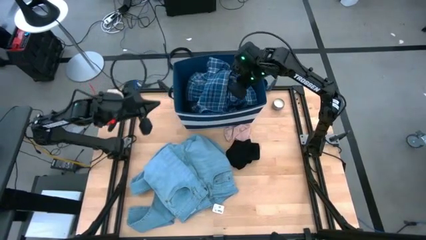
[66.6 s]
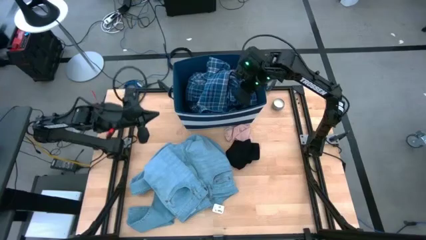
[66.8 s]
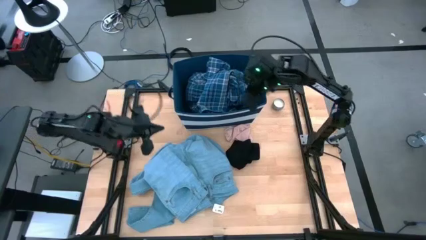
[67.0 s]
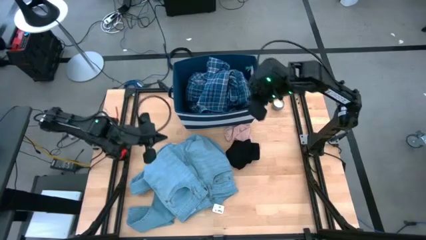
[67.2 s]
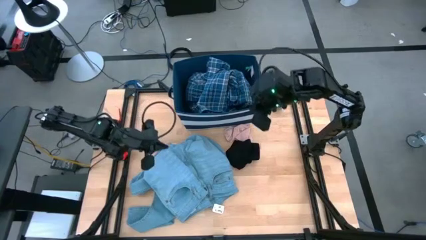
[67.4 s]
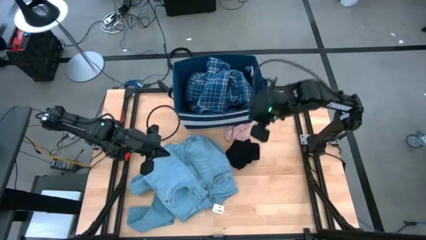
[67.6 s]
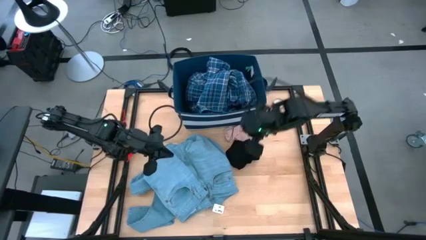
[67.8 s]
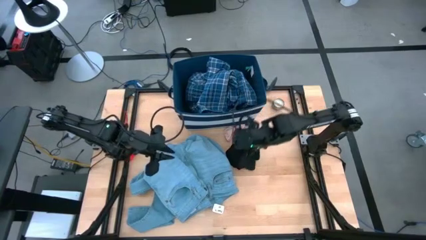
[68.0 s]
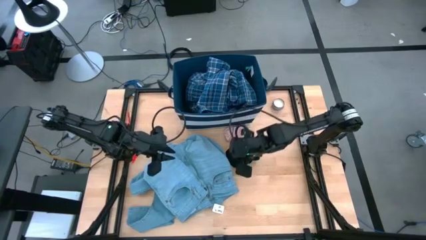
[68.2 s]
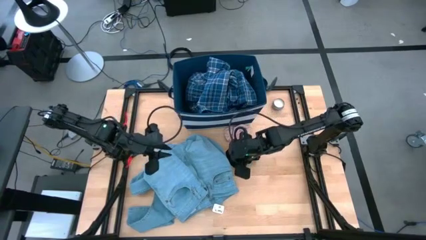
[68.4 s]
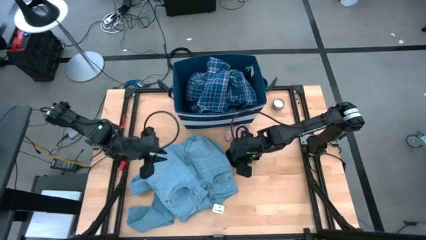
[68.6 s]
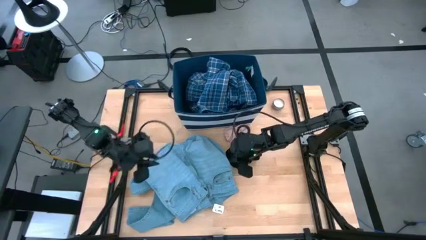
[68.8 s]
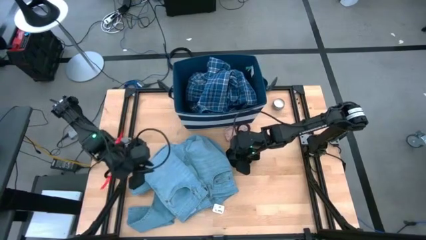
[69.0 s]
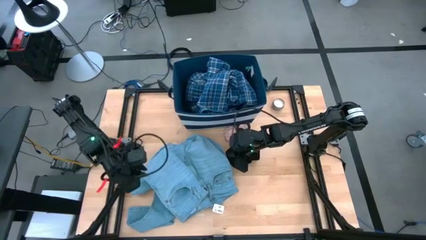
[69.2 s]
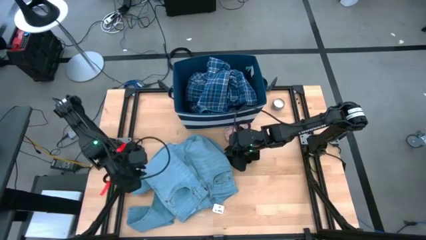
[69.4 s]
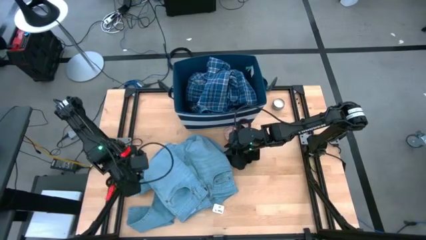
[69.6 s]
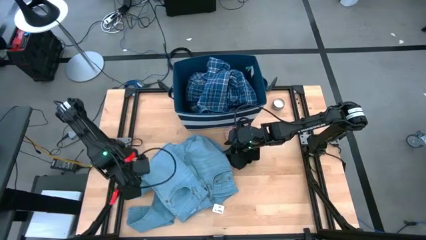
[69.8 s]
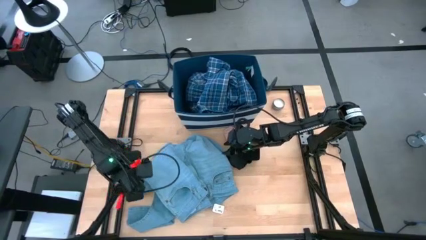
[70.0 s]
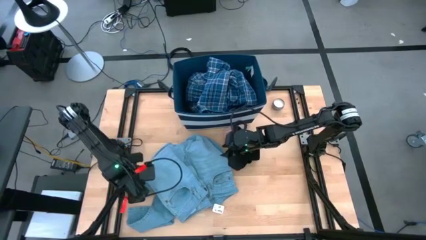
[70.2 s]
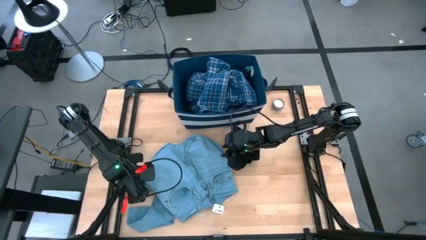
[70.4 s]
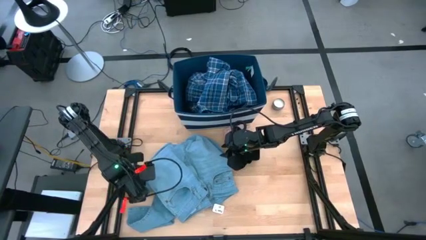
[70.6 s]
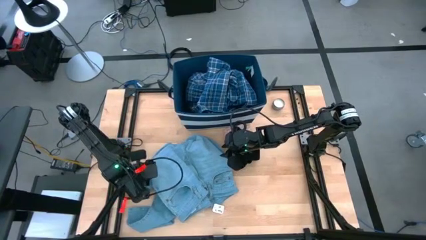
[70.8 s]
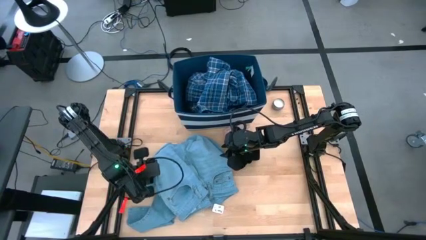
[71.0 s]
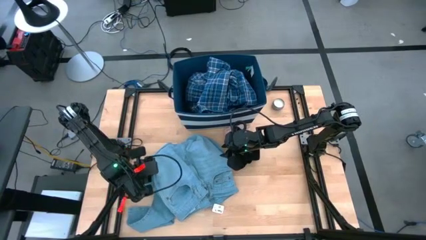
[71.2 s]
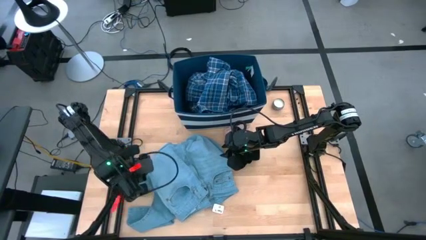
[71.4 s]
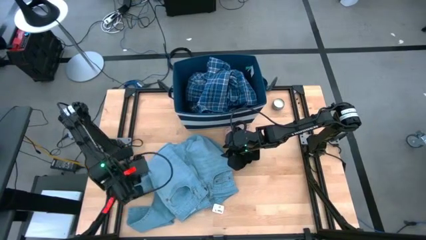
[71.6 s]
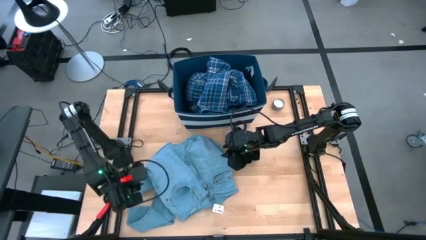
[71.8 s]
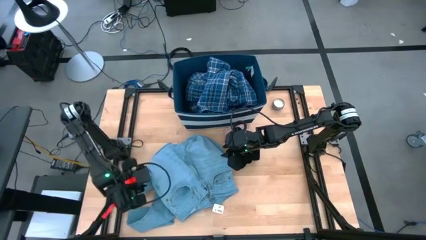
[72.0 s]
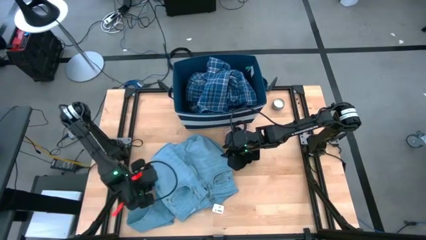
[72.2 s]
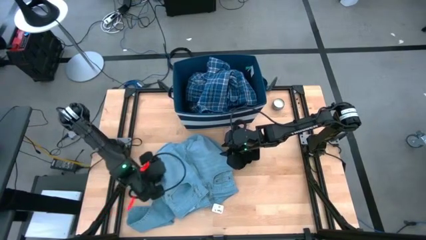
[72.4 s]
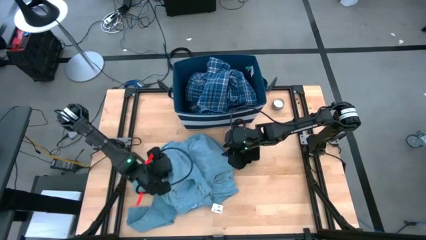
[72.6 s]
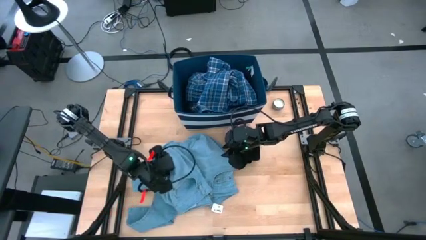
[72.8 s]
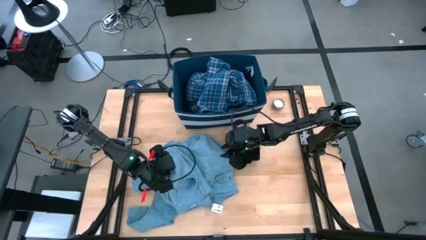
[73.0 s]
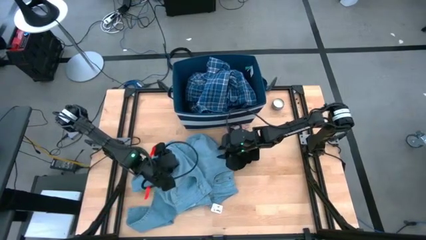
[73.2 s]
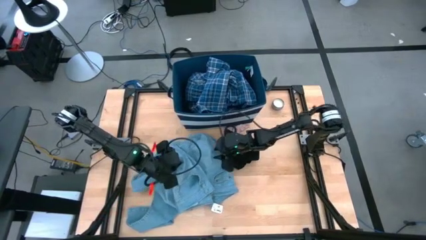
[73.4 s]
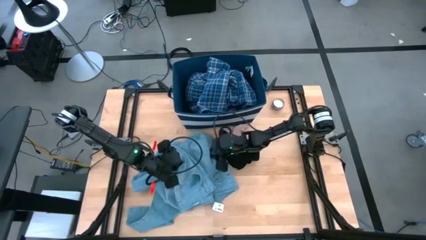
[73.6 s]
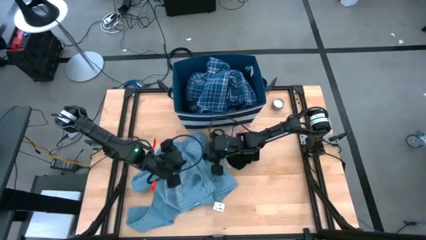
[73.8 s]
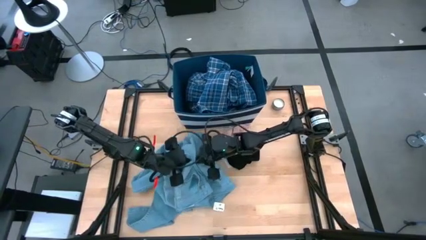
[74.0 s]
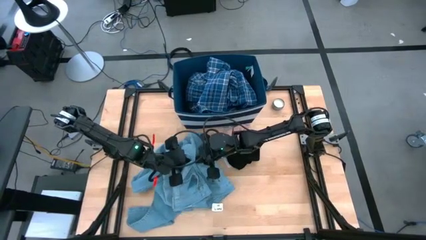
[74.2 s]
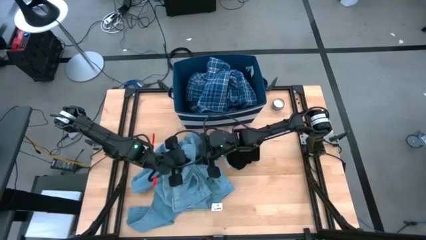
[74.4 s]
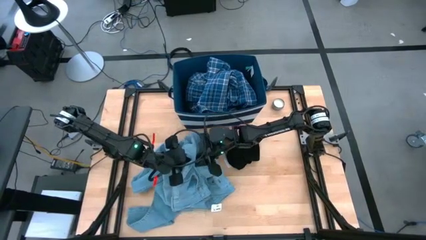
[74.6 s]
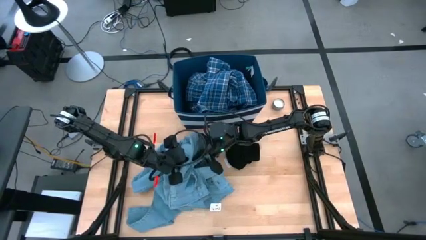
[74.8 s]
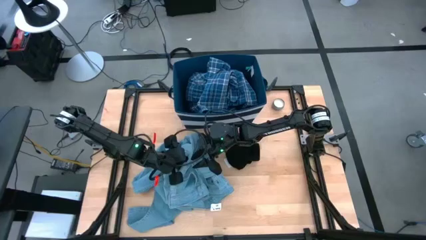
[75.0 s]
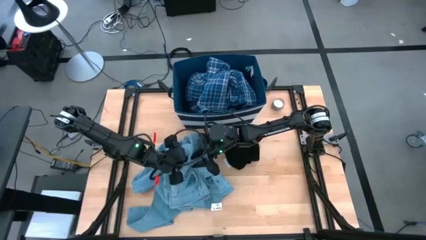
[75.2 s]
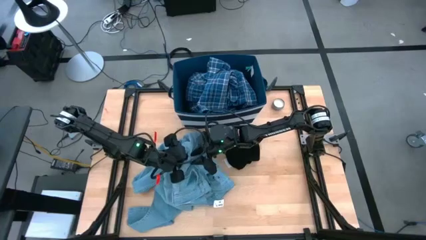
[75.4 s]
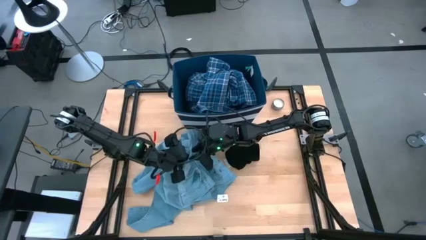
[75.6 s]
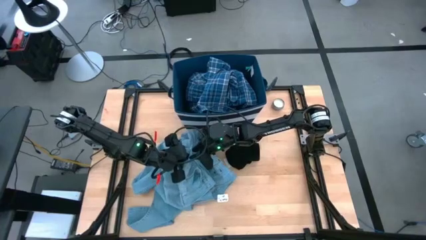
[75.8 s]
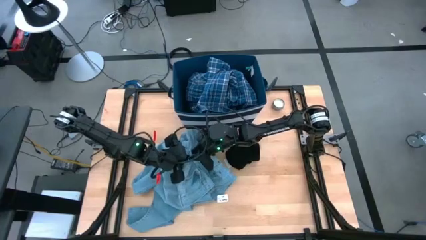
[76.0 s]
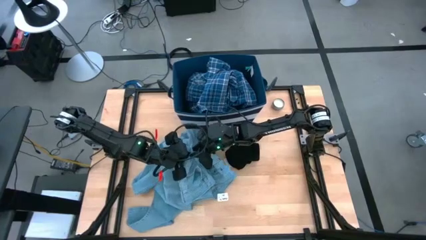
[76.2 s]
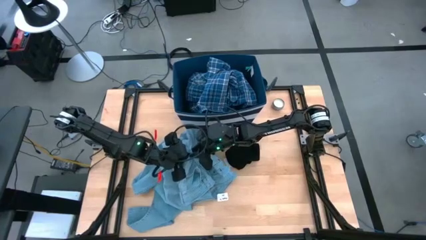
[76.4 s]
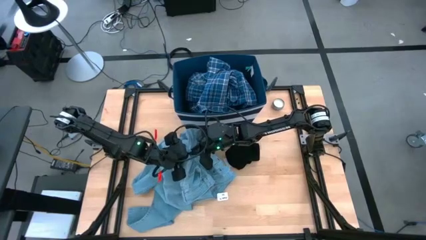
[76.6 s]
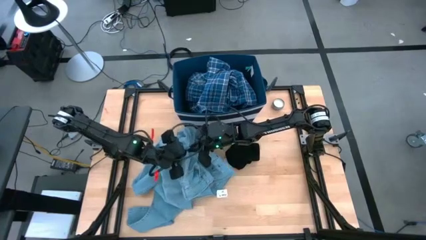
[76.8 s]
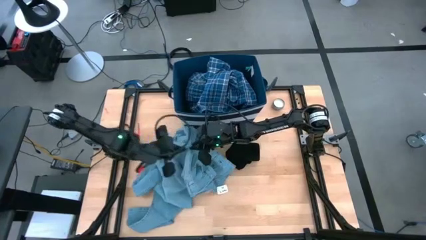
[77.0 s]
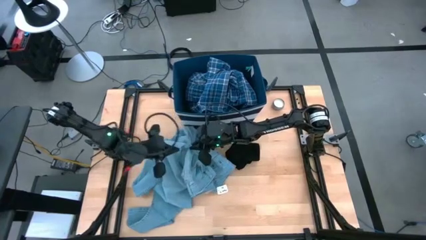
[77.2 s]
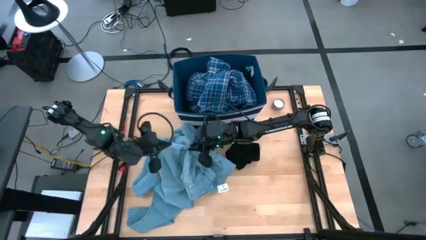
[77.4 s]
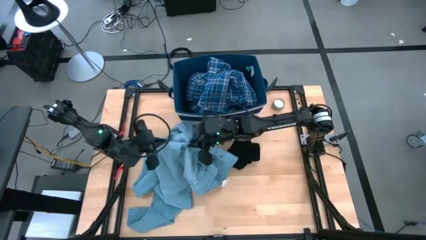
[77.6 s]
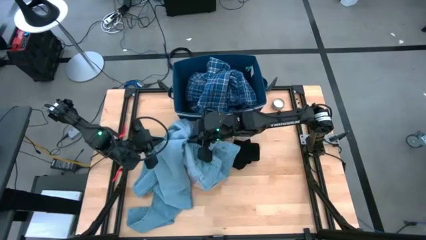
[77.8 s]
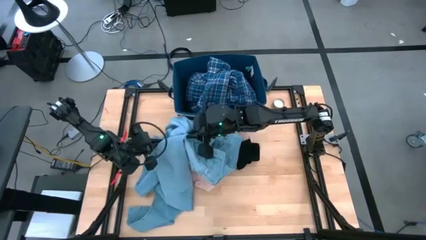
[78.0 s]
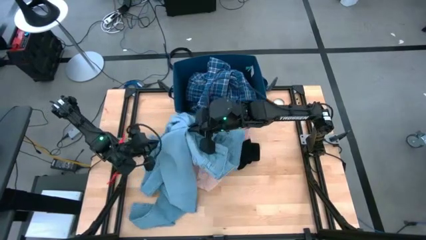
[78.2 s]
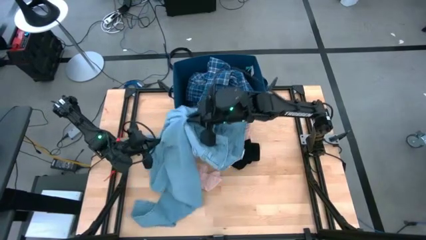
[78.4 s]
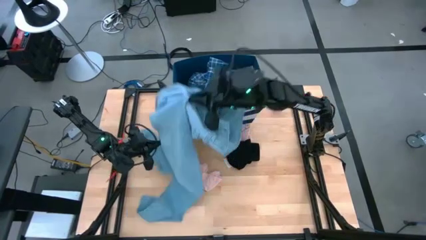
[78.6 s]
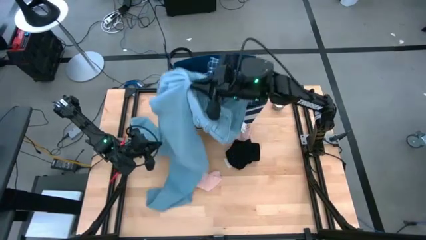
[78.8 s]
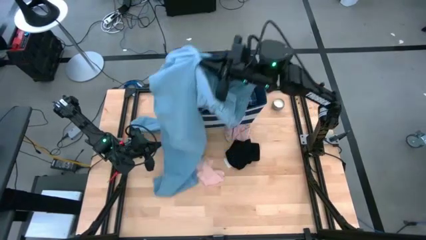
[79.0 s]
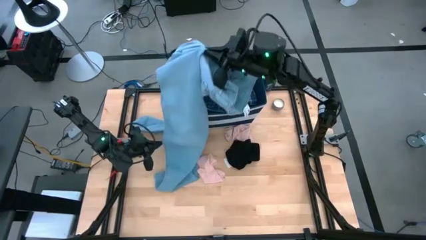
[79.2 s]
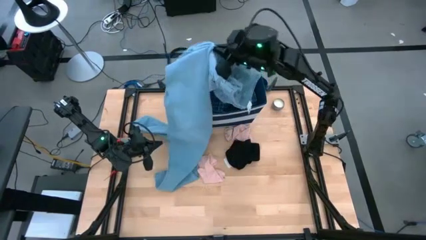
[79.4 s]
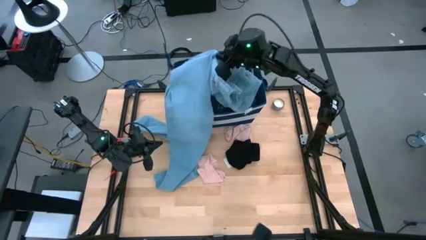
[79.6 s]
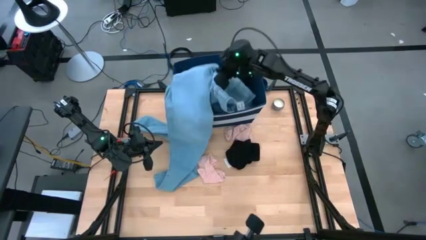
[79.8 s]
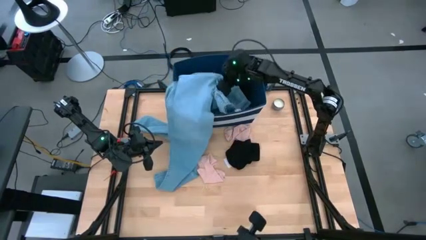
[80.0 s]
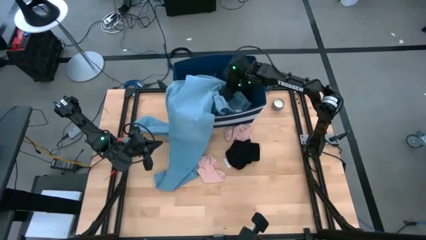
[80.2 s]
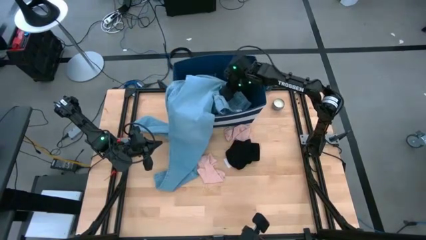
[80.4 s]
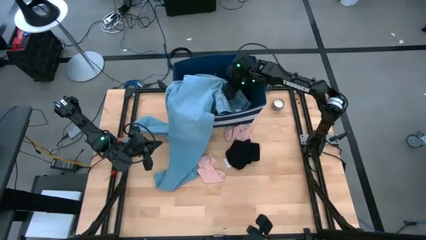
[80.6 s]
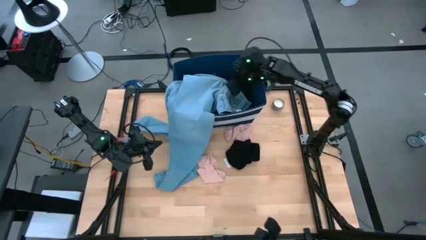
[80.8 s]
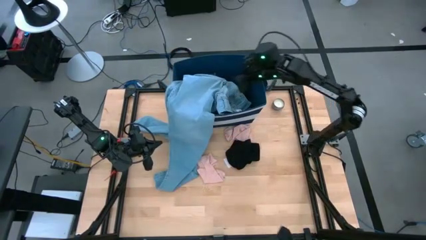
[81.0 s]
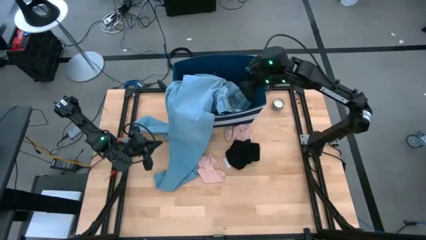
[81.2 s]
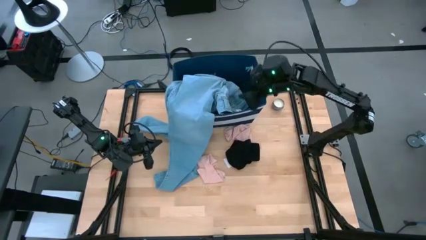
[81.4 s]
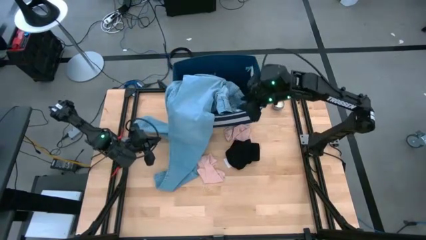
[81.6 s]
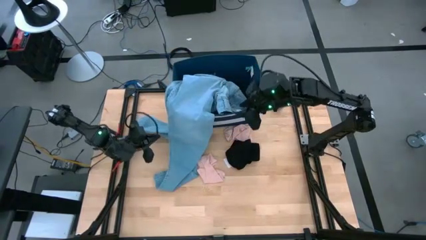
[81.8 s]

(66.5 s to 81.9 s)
Task: Sort clothes
Put the light blue pants into the blue organizer bin
